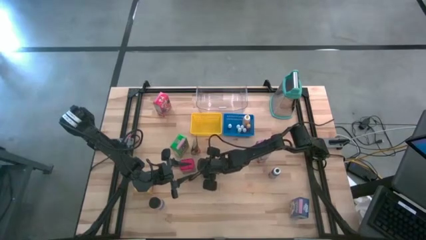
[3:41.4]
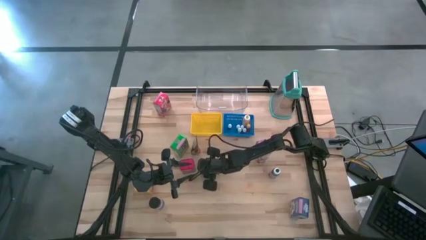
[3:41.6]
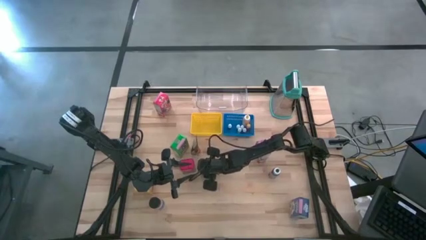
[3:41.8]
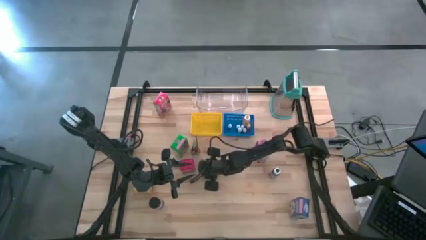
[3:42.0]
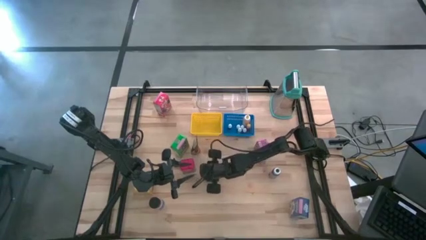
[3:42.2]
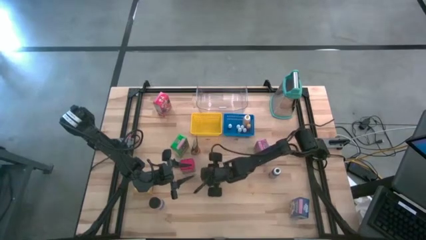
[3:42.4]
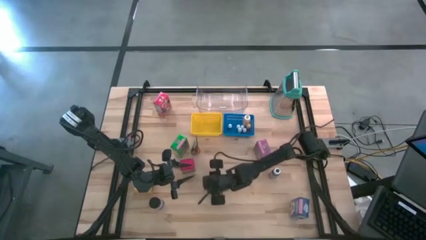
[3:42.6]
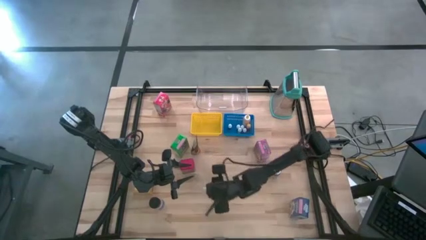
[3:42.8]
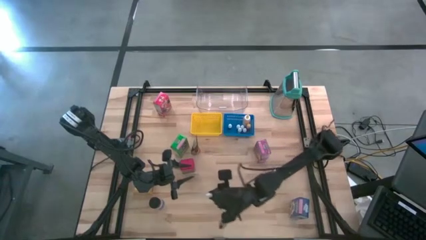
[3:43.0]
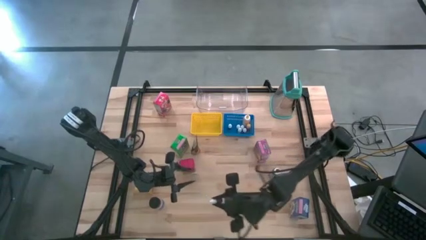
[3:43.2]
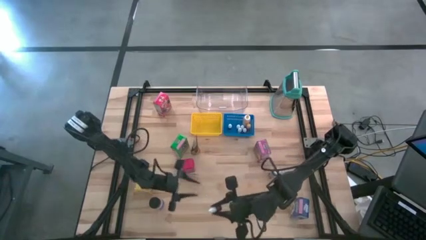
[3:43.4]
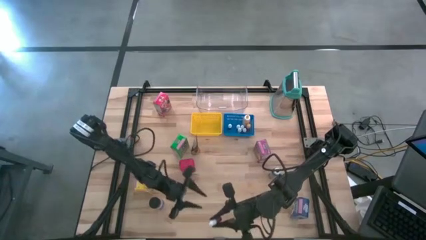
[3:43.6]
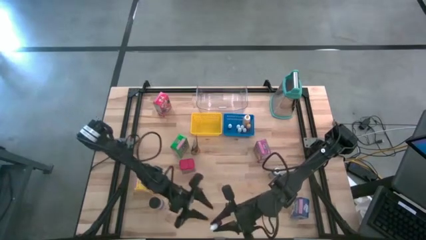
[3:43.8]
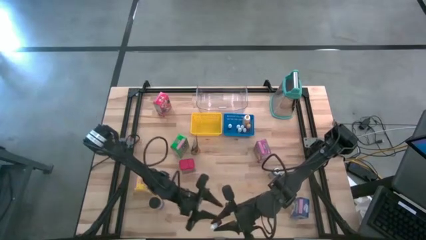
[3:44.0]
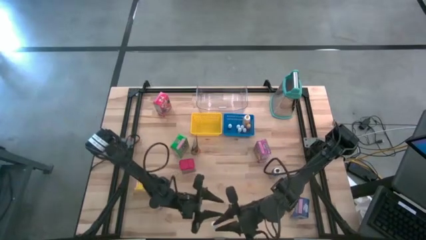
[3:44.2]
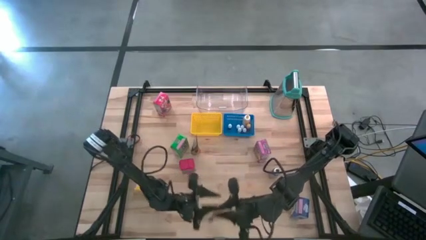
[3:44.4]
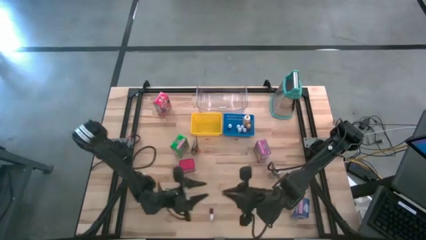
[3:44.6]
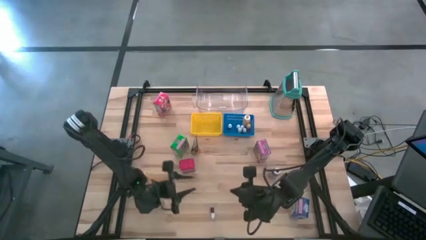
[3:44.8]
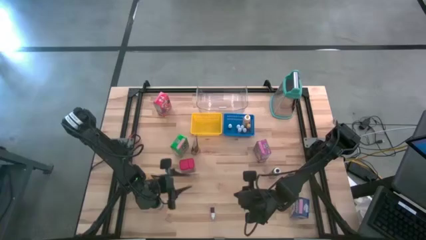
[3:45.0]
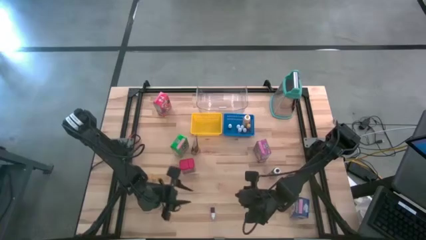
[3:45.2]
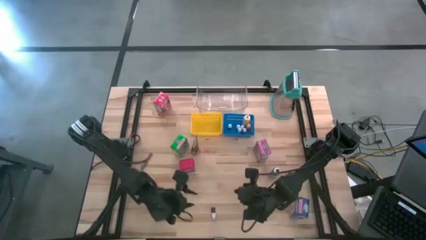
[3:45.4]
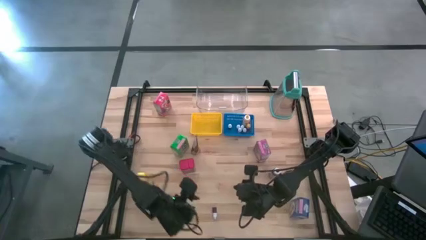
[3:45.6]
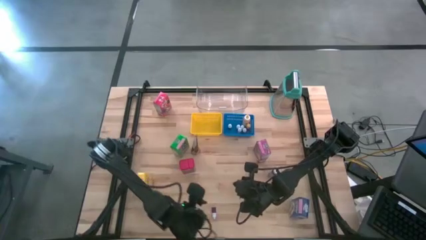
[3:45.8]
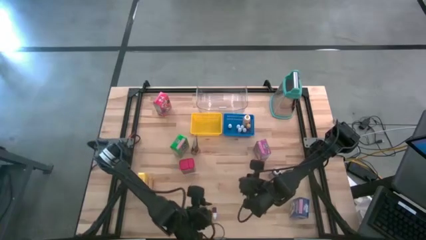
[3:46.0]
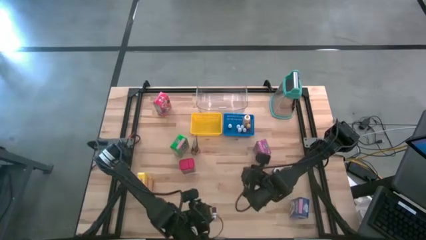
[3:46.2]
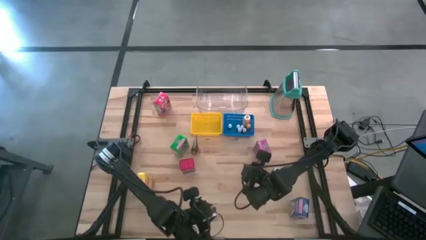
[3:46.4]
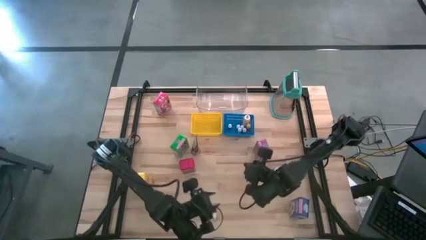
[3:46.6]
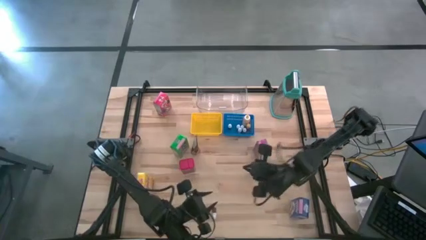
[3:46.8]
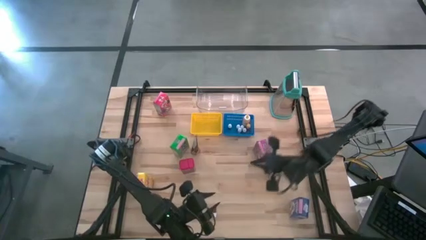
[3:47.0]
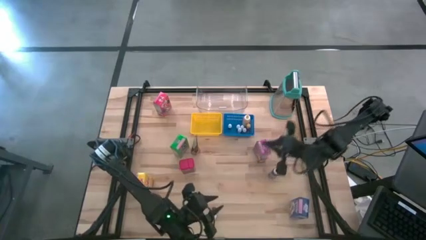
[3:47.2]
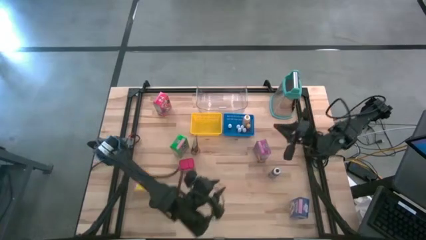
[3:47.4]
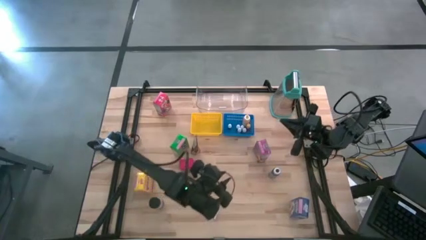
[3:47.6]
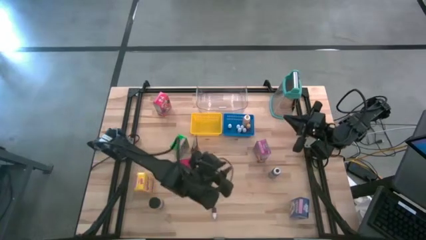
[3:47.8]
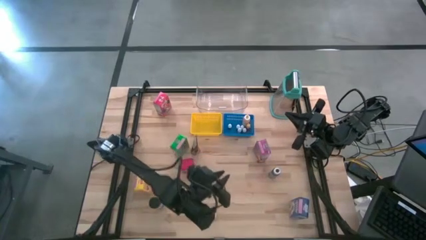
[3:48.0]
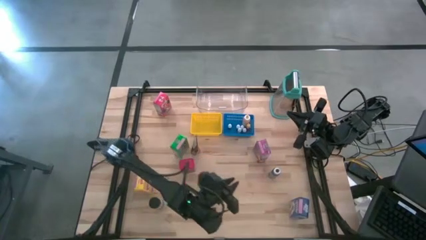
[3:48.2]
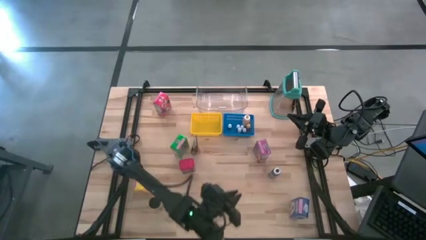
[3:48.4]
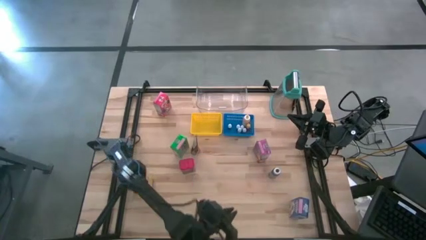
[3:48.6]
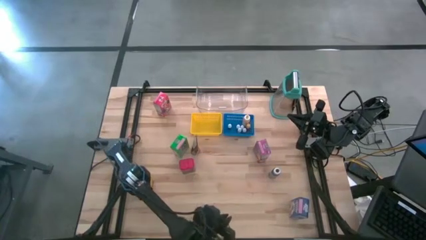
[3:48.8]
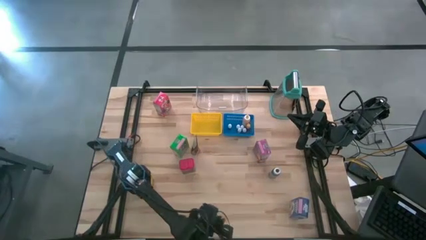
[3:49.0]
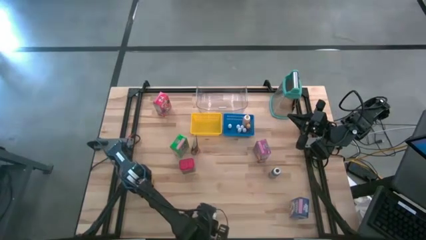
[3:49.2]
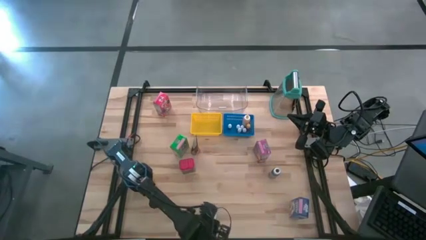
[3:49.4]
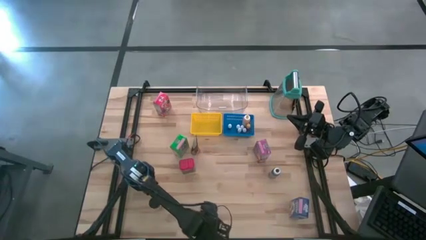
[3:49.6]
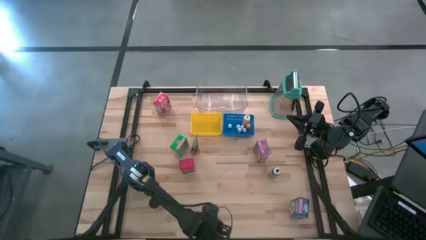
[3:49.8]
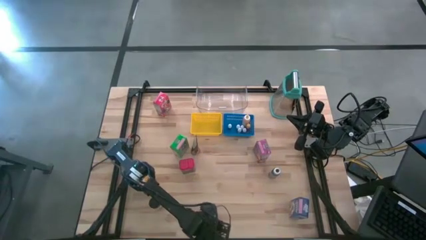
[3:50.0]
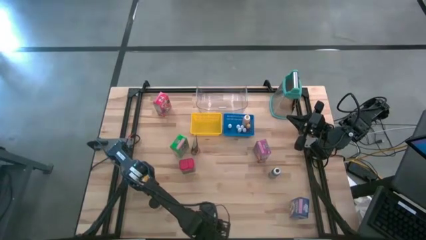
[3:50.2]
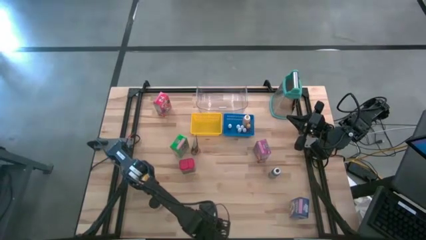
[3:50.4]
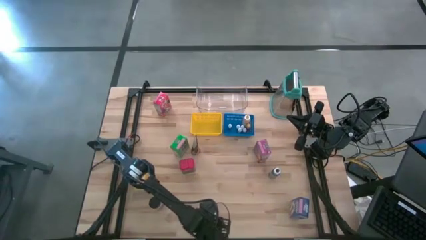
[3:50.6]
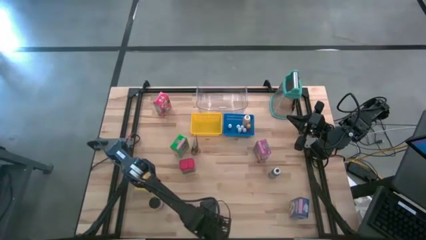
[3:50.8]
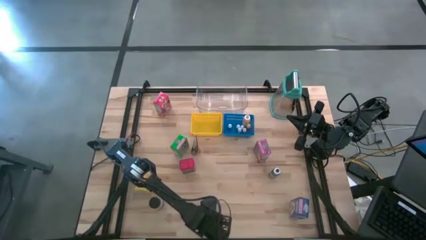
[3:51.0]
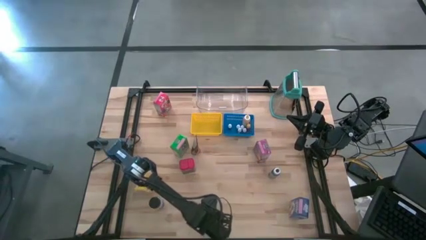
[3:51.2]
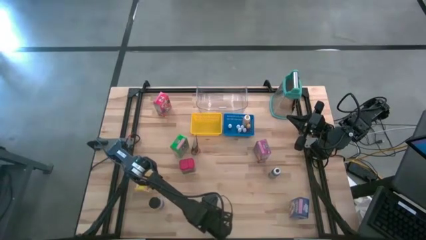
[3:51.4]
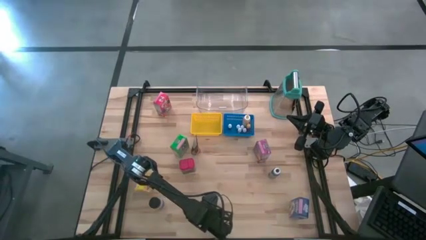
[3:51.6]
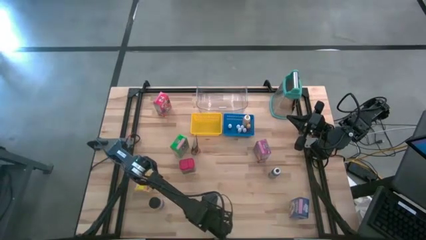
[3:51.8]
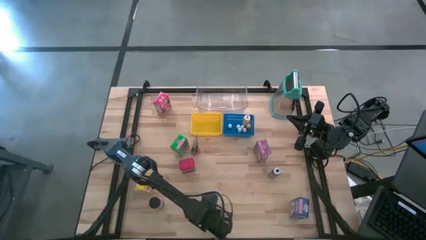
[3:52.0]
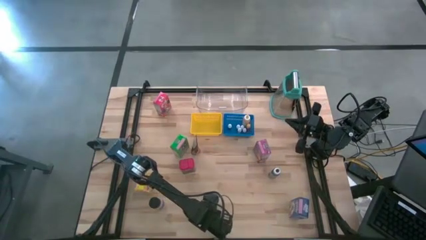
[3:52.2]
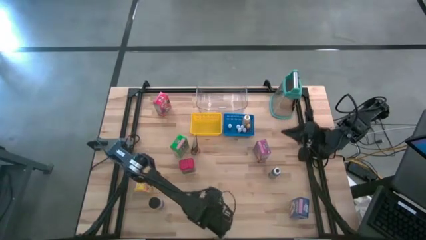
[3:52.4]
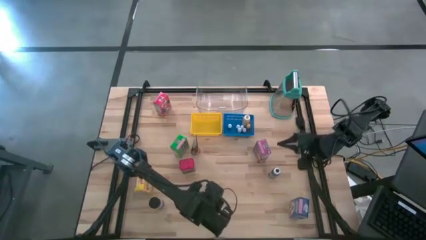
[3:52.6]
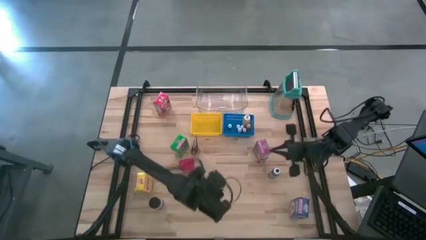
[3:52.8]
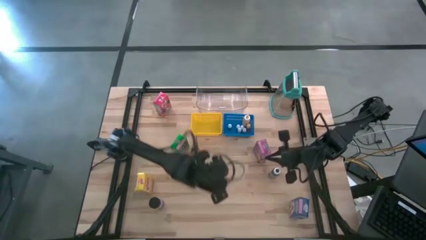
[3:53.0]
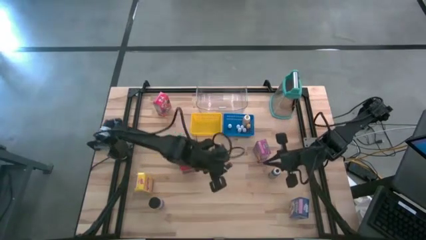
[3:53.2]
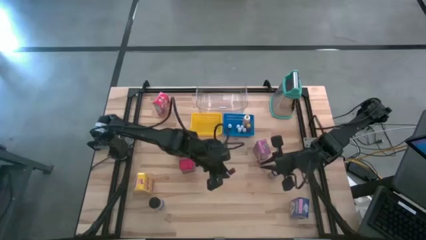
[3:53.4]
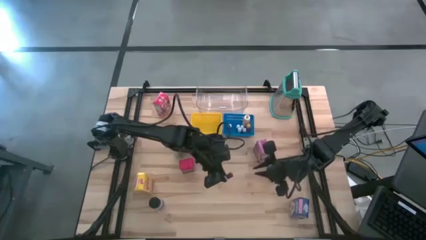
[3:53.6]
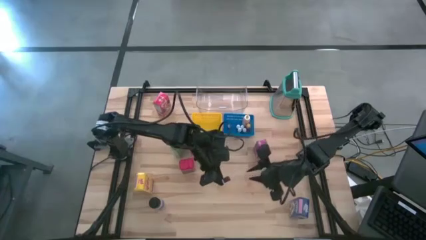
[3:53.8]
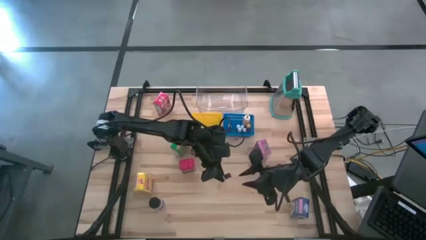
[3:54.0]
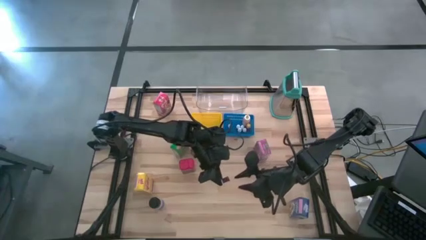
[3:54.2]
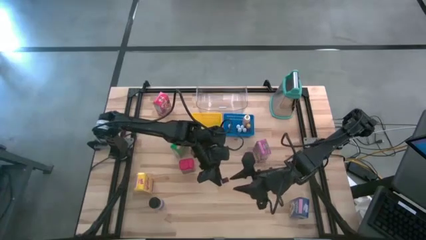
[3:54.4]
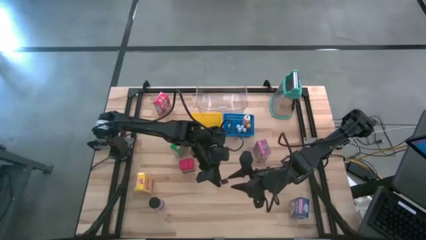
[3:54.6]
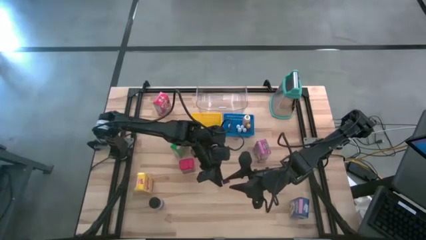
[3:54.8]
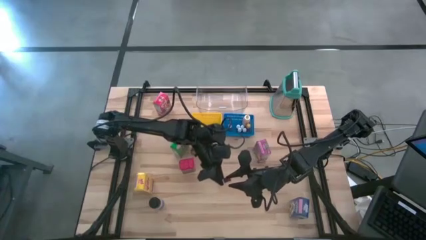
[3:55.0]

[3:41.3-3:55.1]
Task: Pick & Place Kitchen Items
Put the orange food coloring bottle into the blue bin
